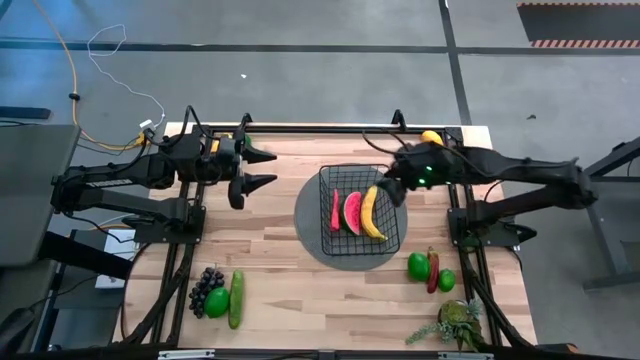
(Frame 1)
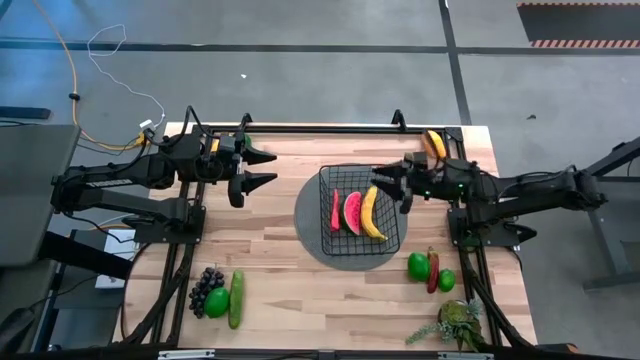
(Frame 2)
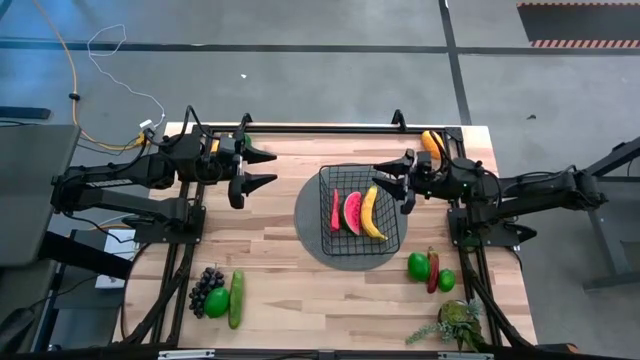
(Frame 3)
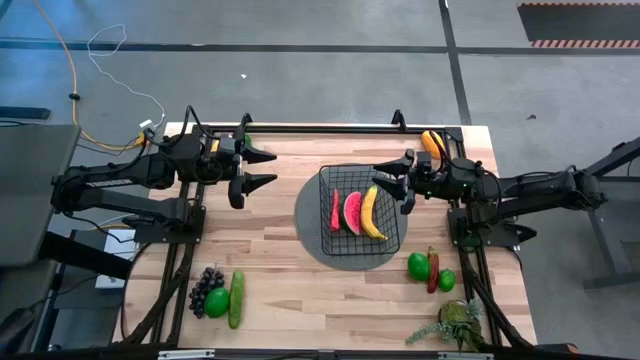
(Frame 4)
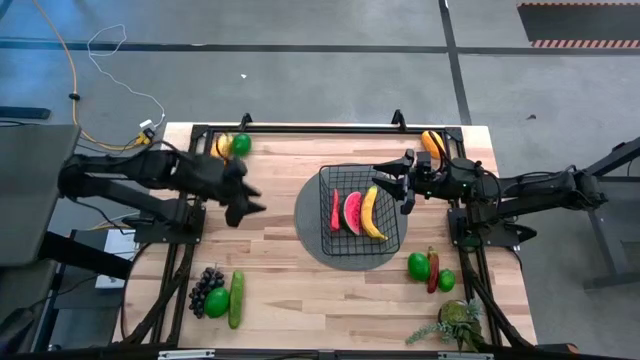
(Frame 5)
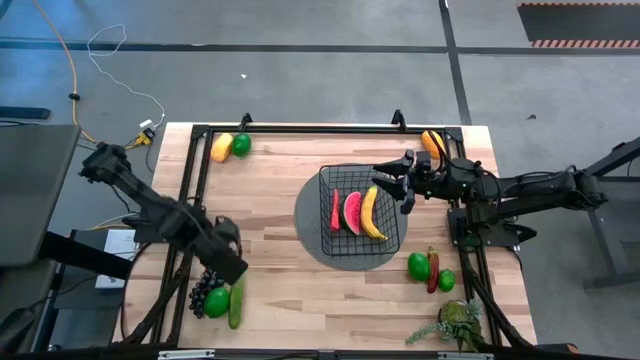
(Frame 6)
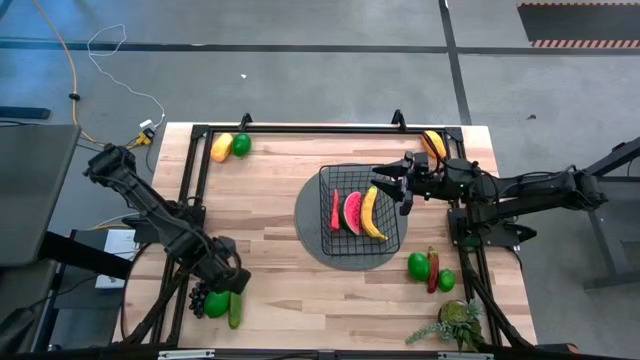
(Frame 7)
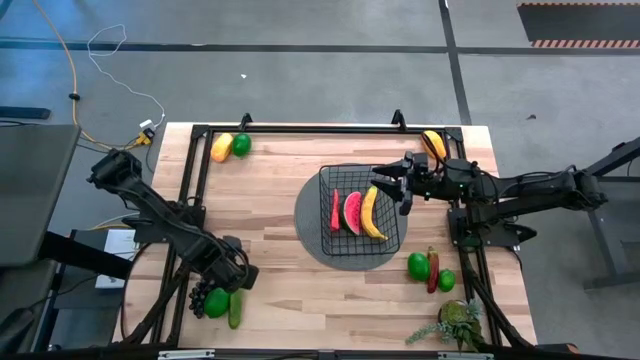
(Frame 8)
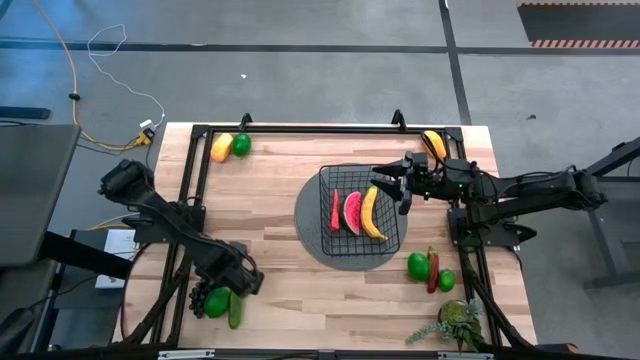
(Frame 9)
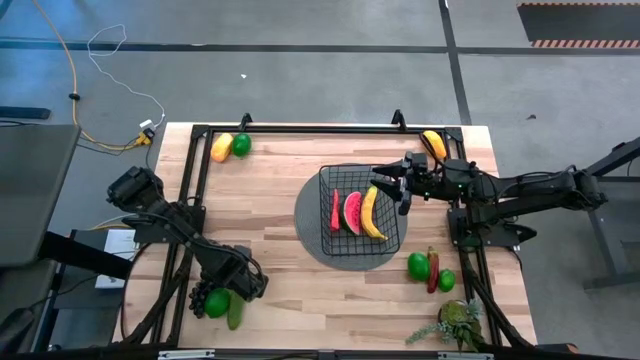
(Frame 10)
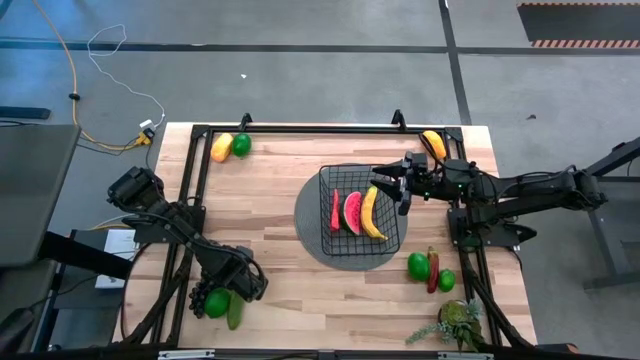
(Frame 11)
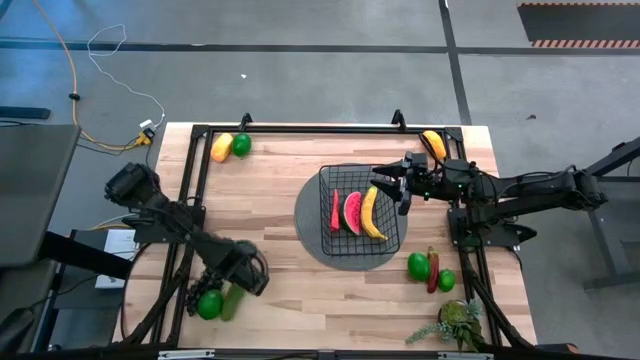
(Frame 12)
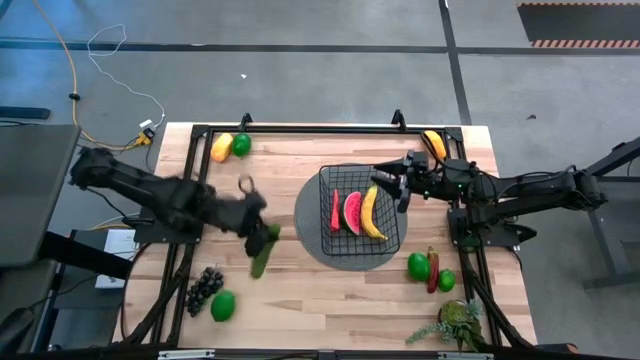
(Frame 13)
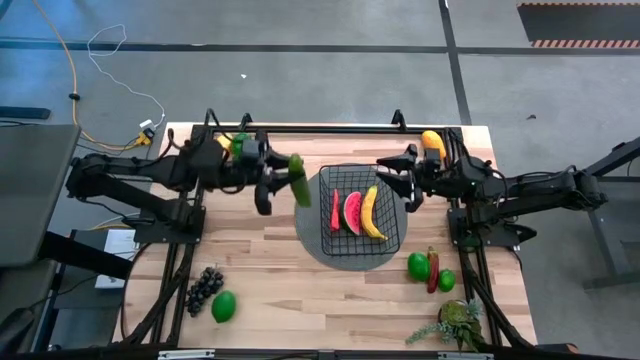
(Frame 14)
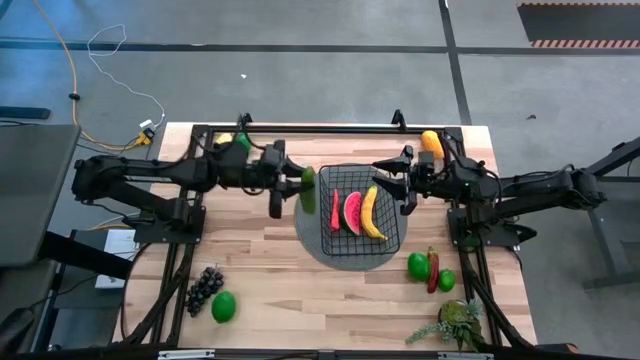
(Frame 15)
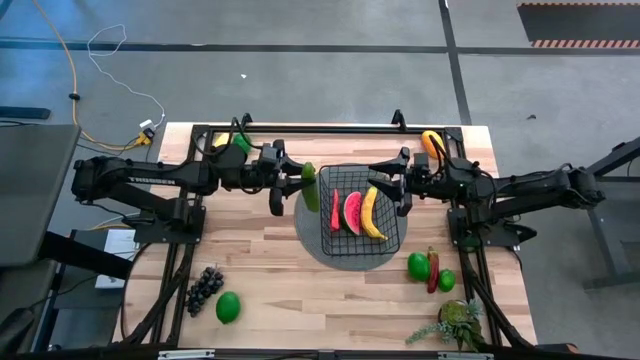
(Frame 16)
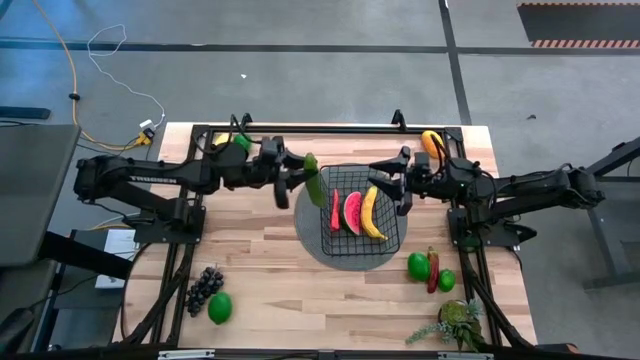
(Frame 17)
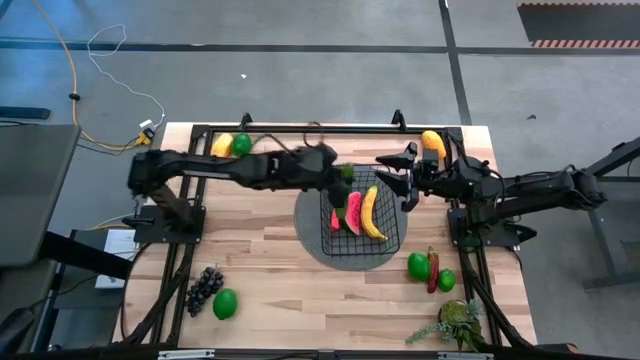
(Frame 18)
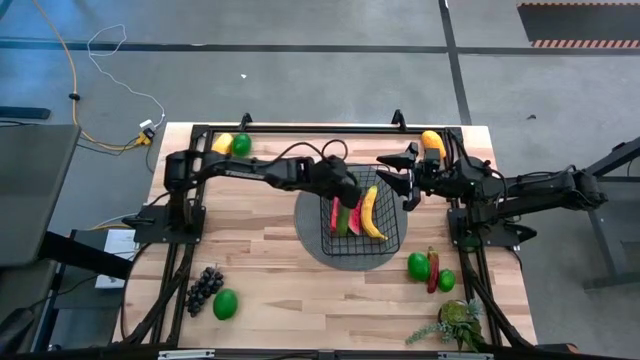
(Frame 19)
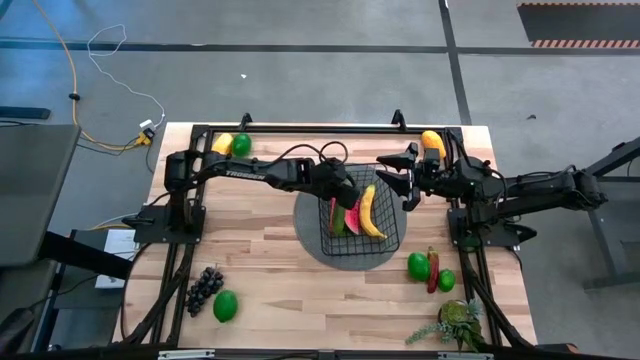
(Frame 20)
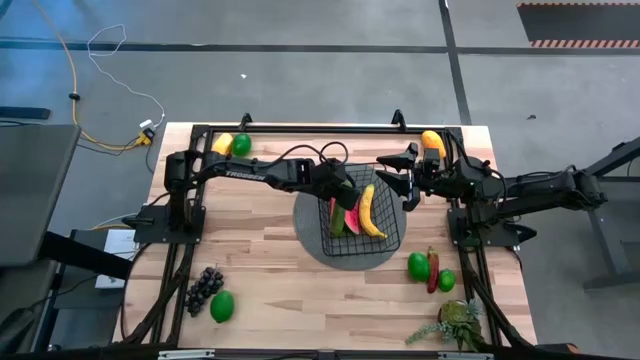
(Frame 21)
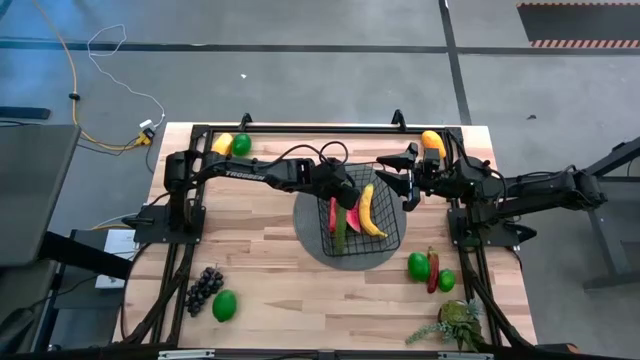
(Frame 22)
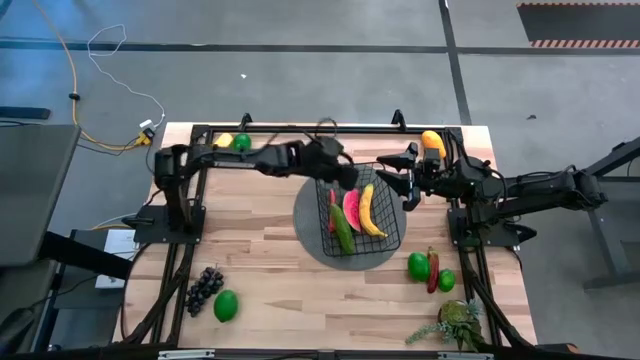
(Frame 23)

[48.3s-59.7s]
Task: Build produce basket
Put the green cucumber into the black wire basket

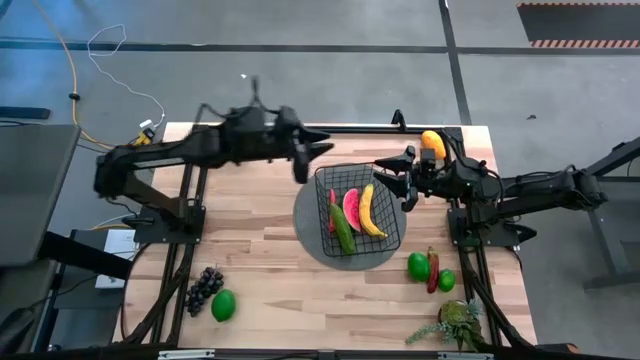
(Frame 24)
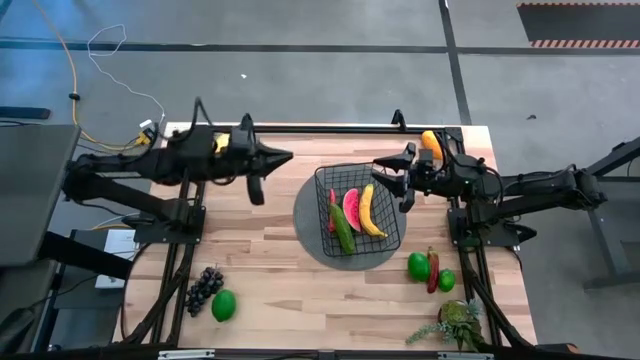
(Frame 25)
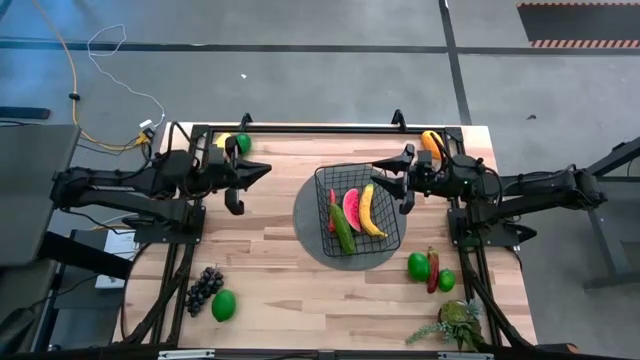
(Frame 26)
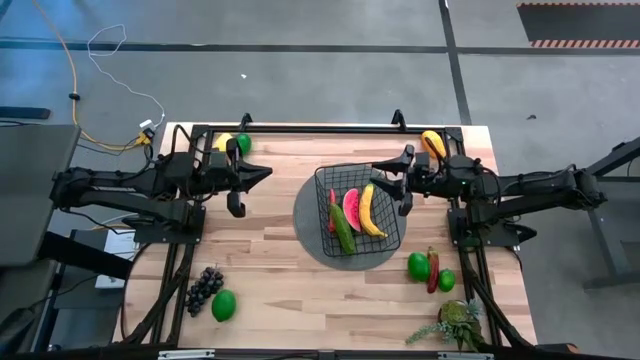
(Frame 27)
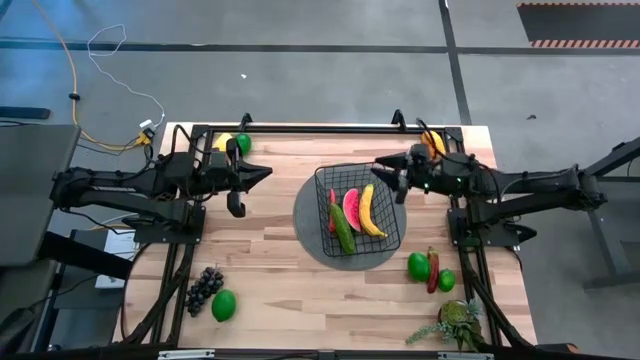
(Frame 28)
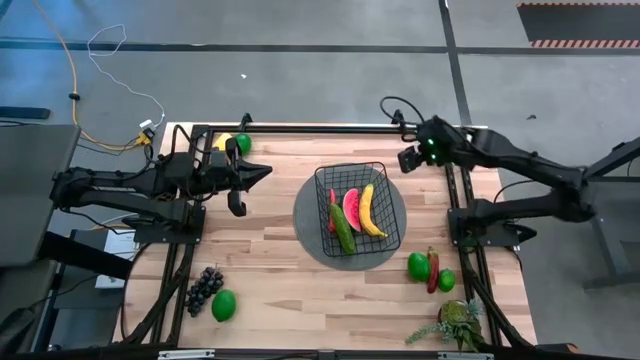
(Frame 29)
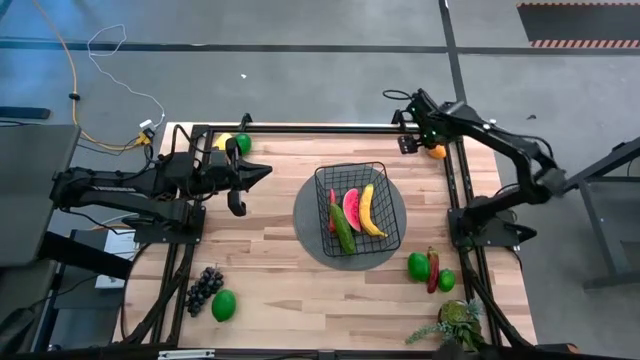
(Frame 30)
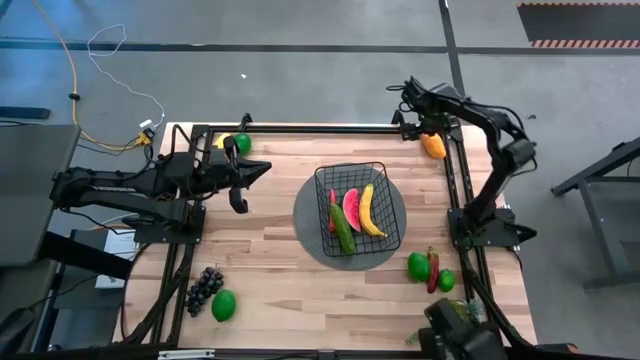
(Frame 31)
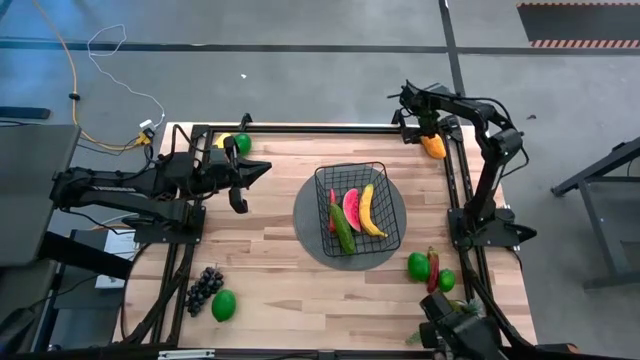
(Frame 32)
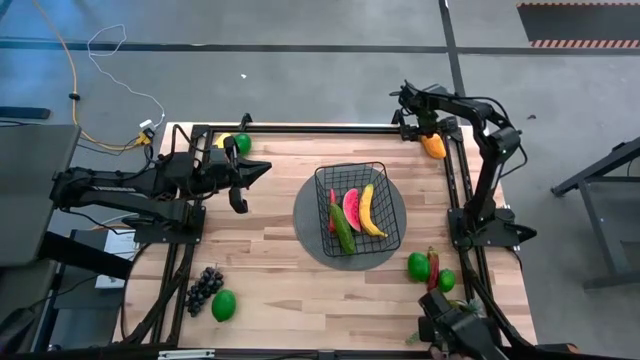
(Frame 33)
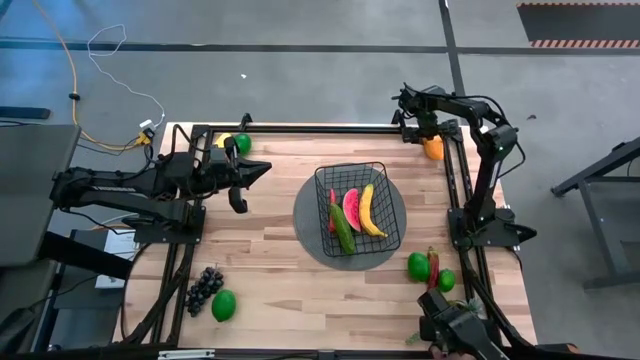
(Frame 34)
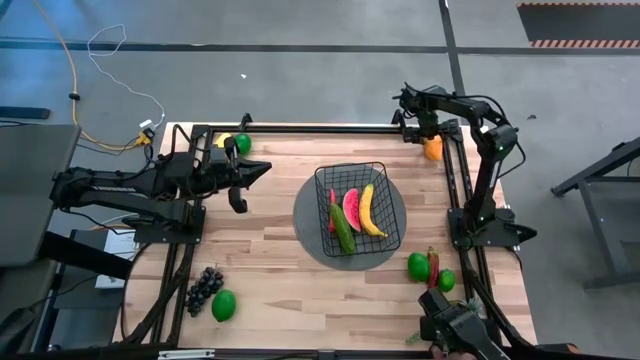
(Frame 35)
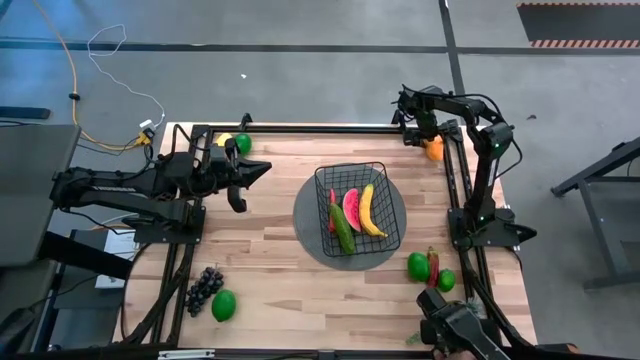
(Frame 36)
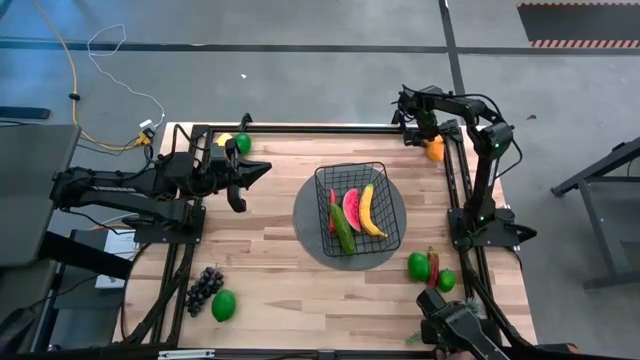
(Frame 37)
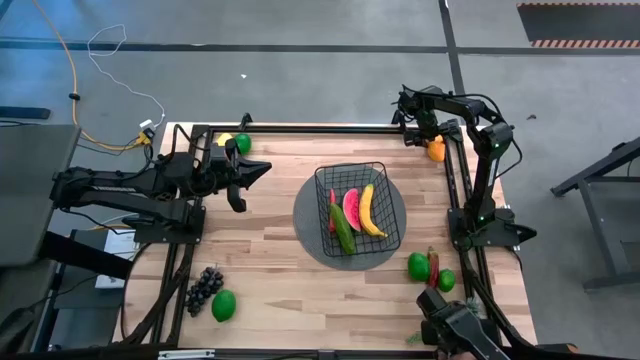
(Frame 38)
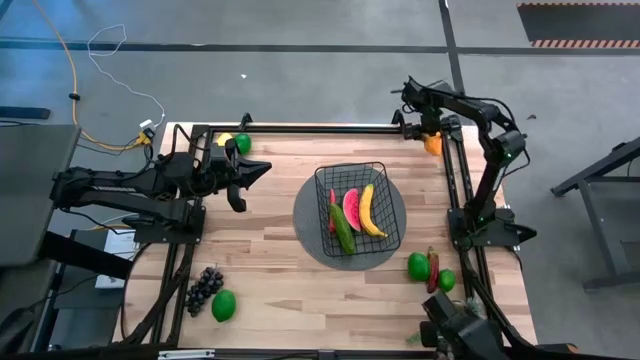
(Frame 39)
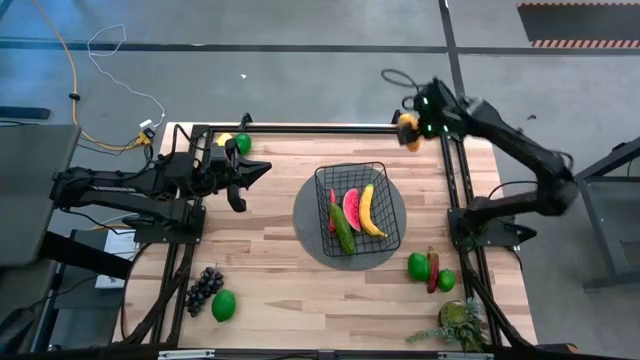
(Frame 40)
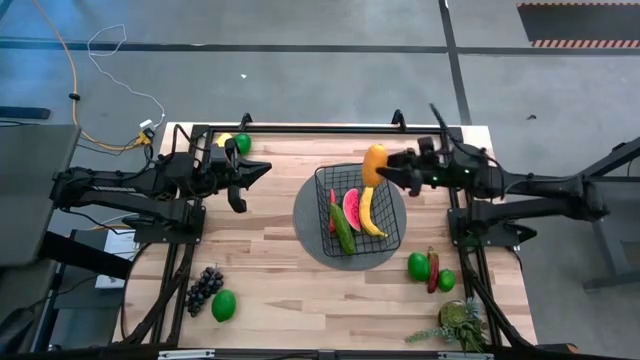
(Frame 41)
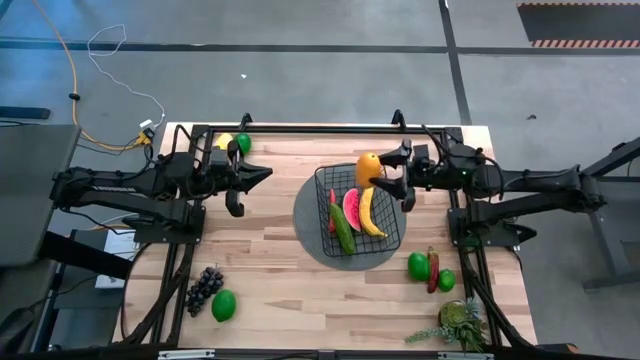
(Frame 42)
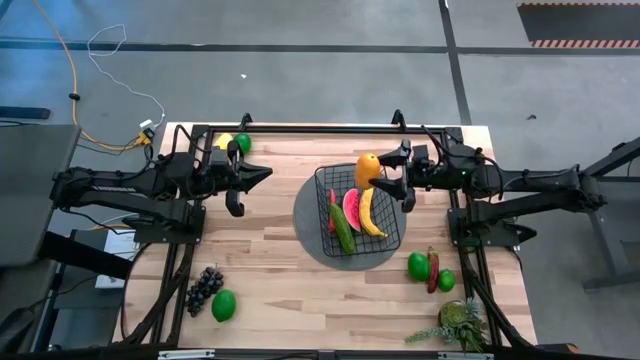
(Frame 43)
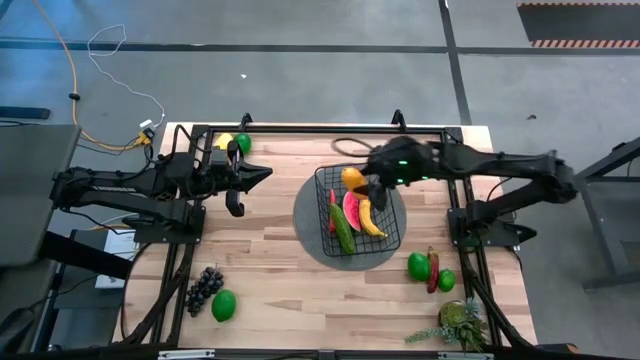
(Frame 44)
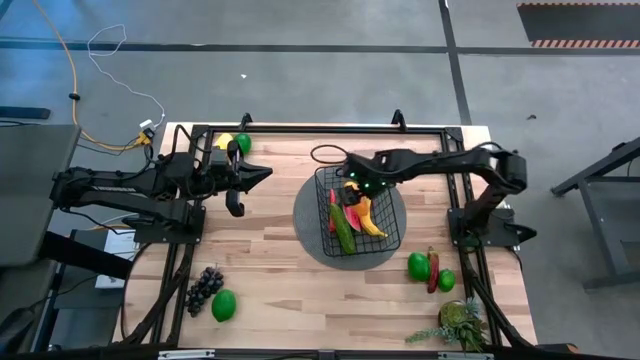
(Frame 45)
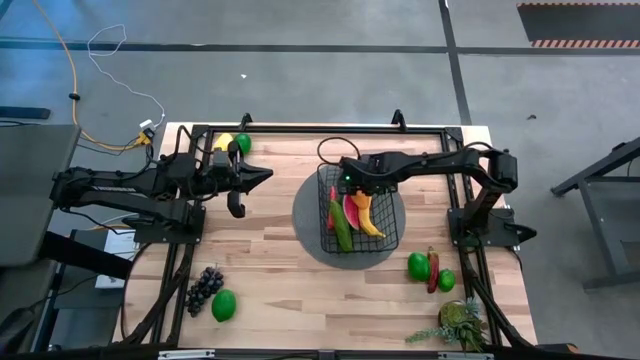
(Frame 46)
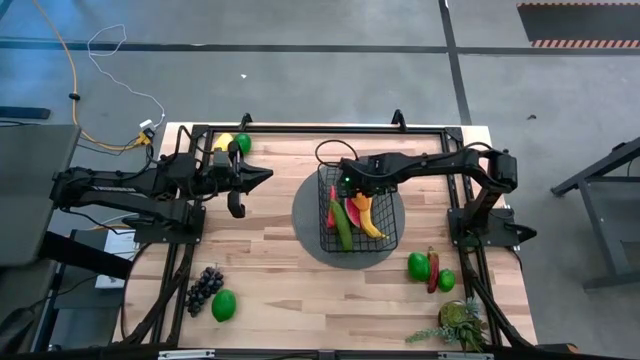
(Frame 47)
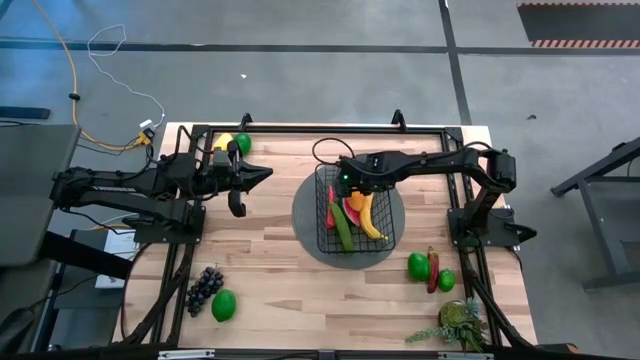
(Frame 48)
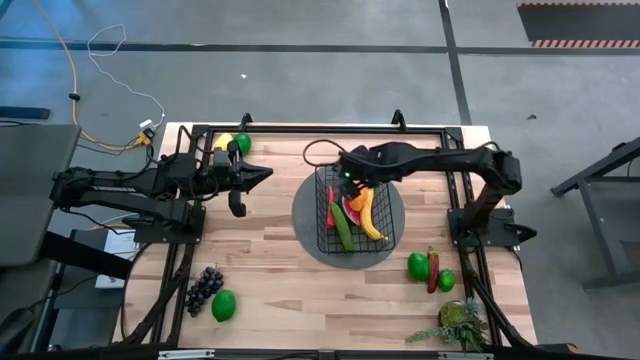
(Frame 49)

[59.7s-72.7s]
Put the yellow mango into the black wire basket
